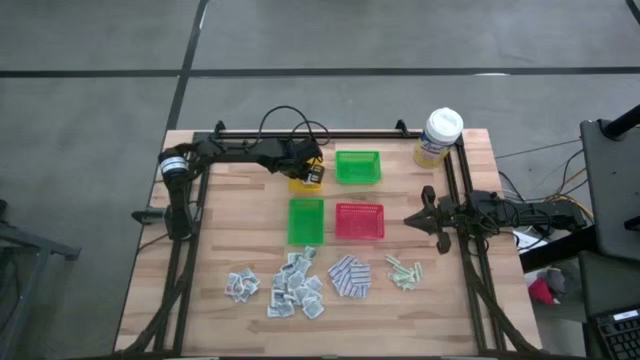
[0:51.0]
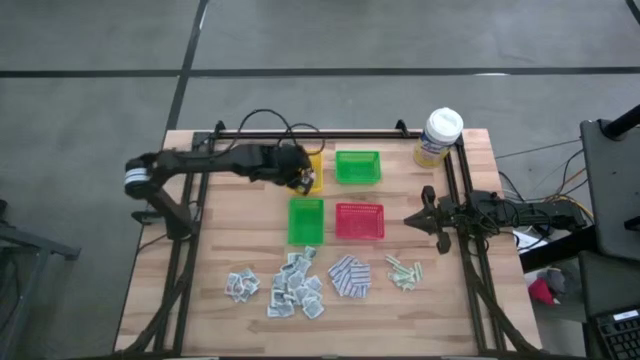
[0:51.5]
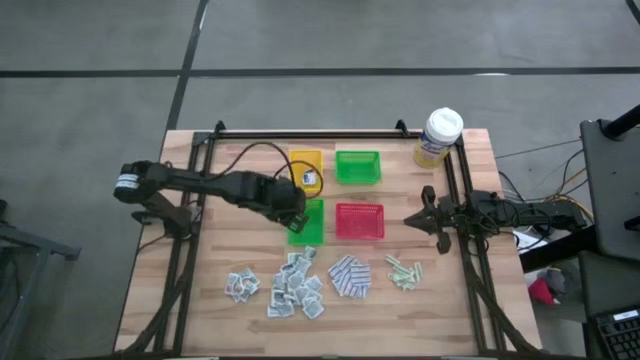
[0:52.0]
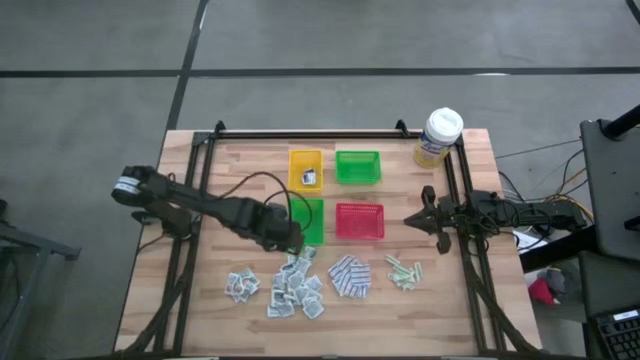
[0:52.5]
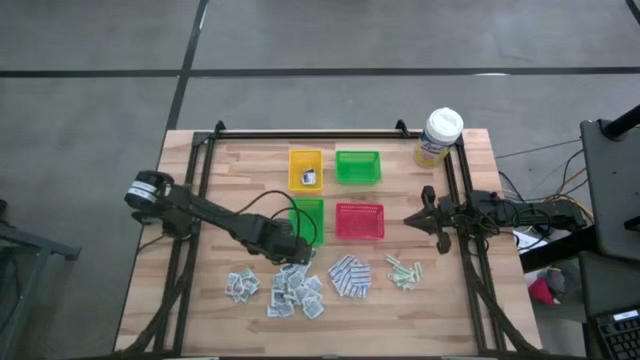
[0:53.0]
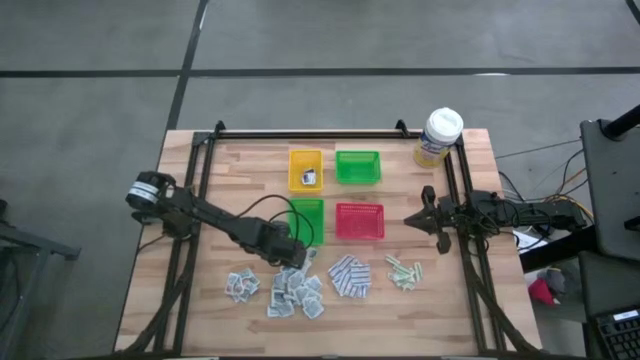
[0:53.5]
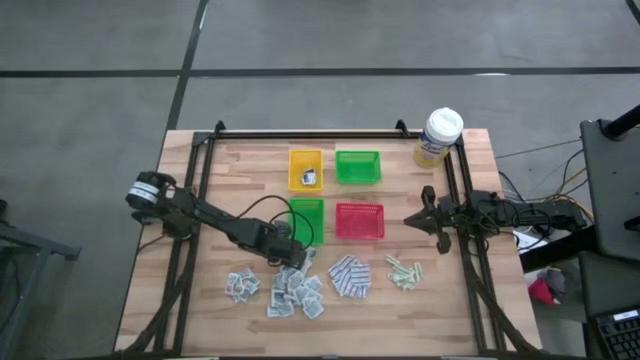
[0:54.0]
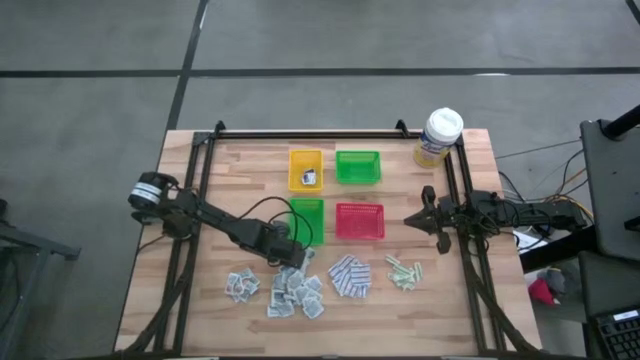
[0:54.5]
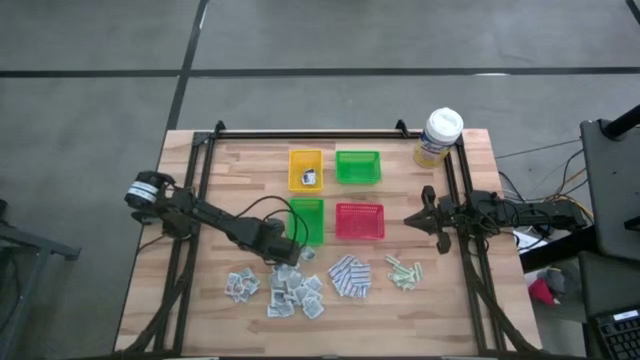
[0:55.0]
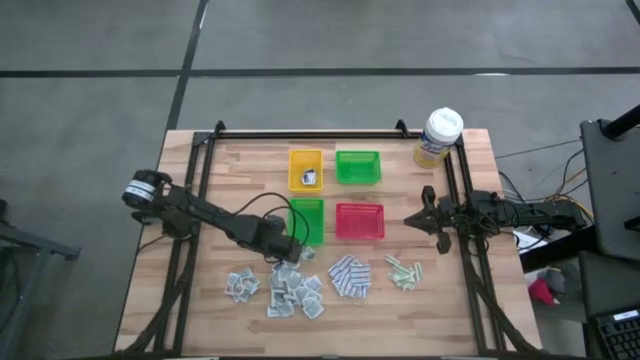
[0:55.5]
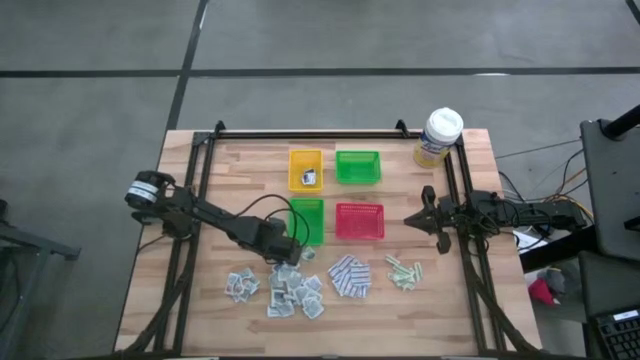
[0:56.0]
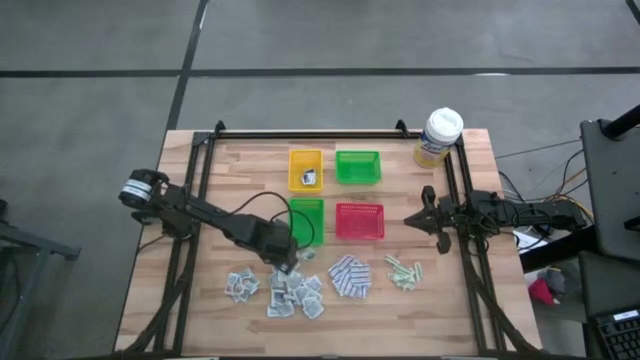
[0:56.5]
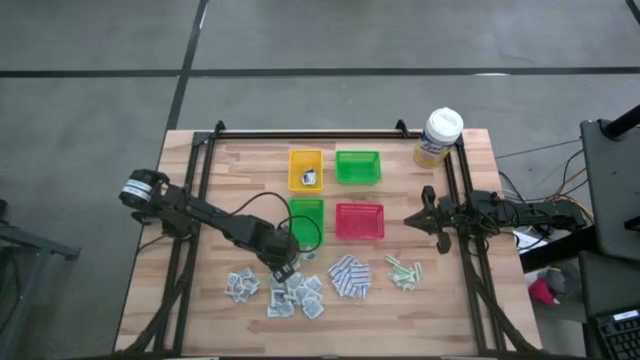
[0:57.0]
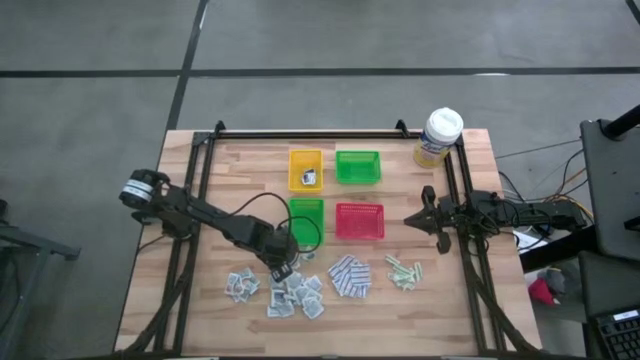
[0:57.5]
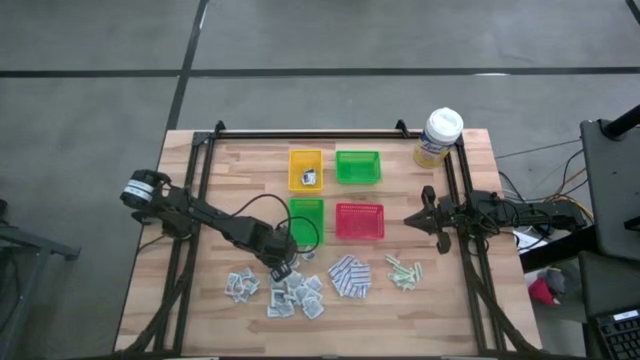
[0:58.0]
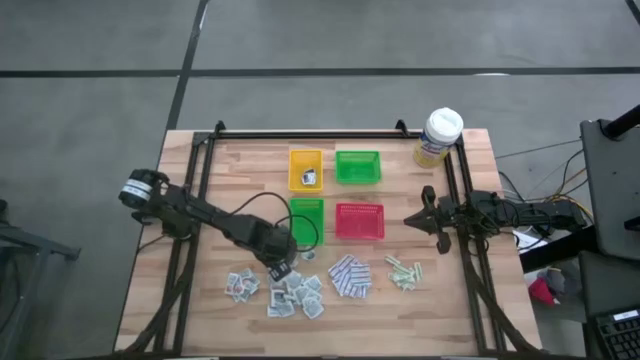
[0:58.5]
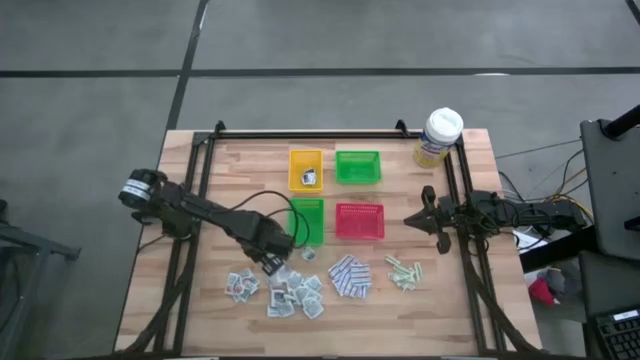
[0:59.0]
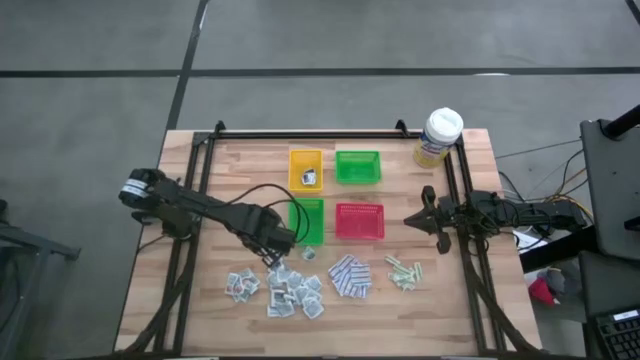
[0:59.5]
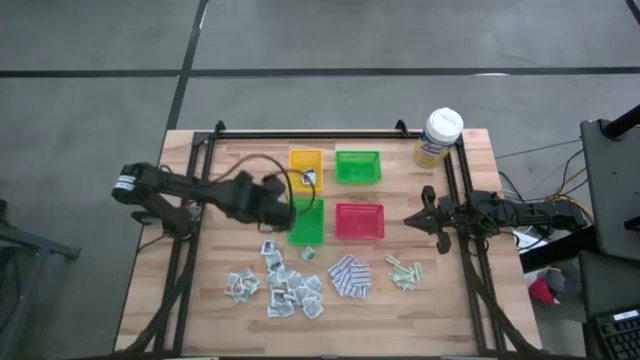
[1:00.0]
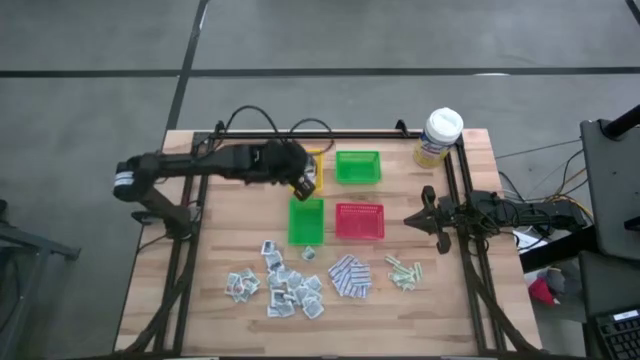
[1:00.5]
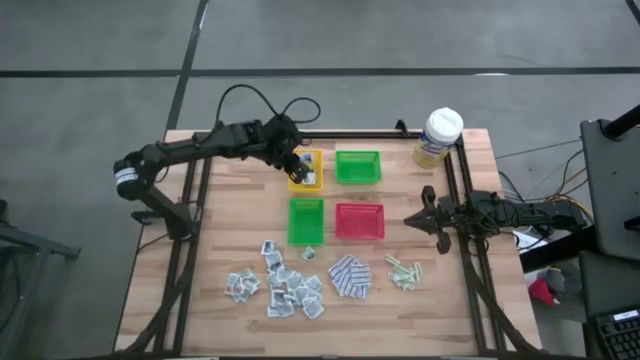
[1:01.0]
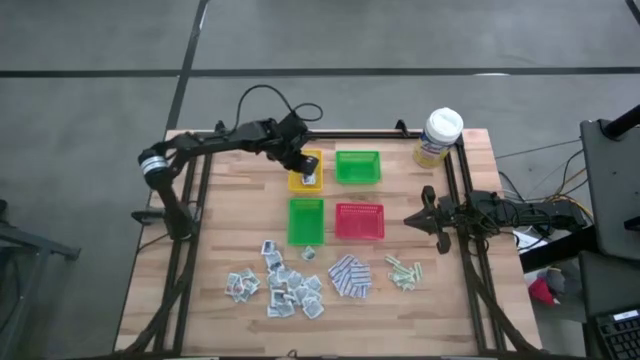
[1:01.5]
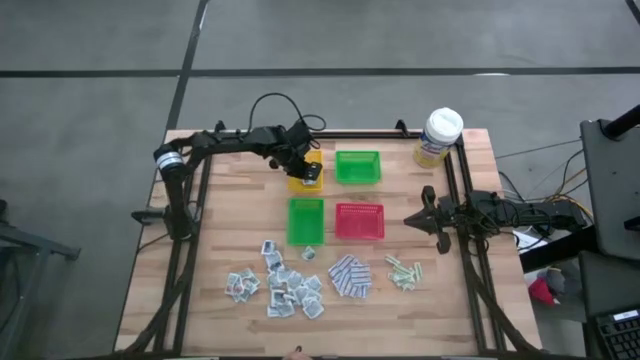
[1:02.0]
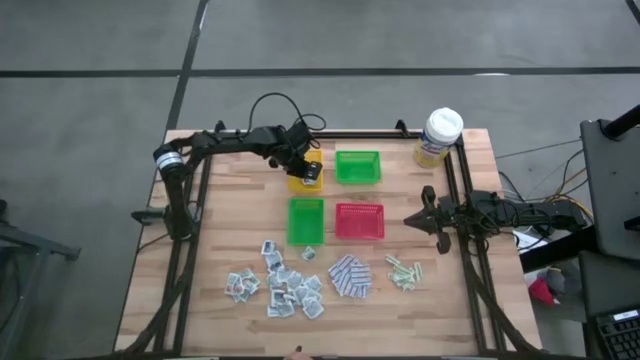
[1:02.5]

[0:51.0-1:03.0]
Task: Pick & Place First Aid Supplies
Put the blue alcohol pad into the yellow bin

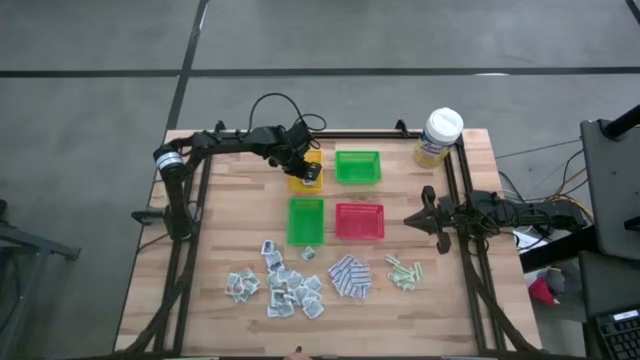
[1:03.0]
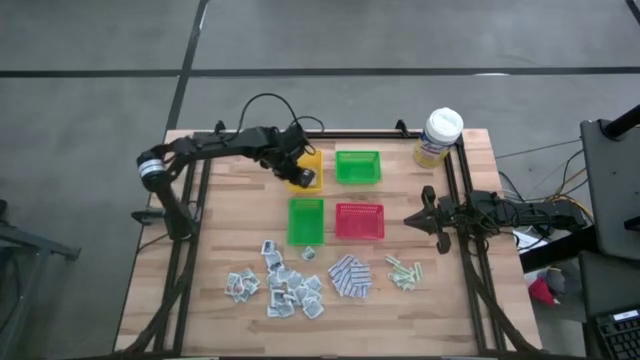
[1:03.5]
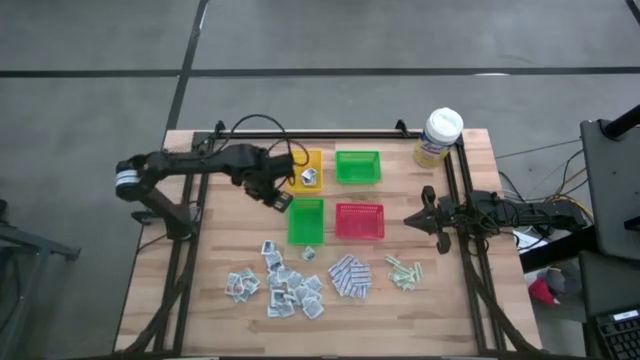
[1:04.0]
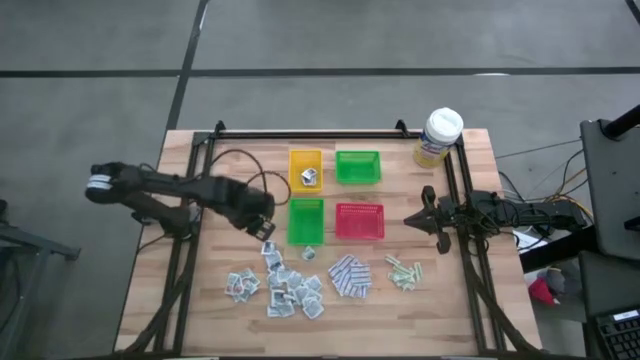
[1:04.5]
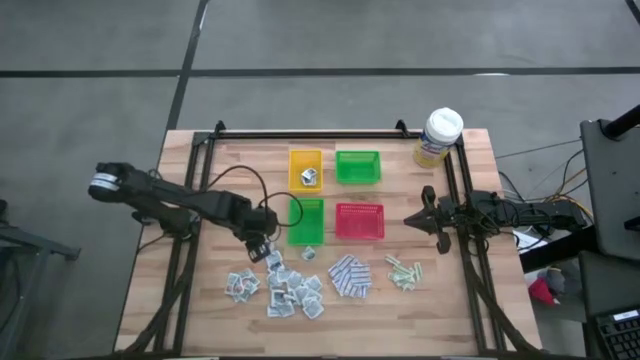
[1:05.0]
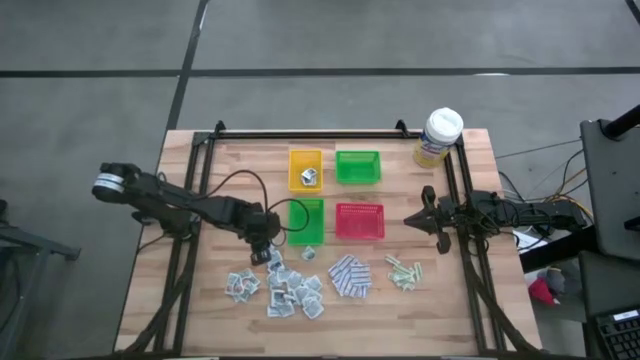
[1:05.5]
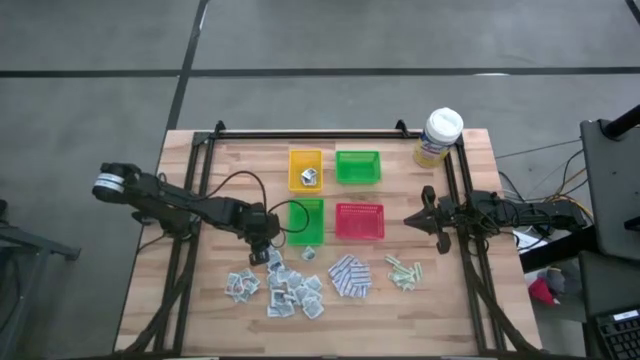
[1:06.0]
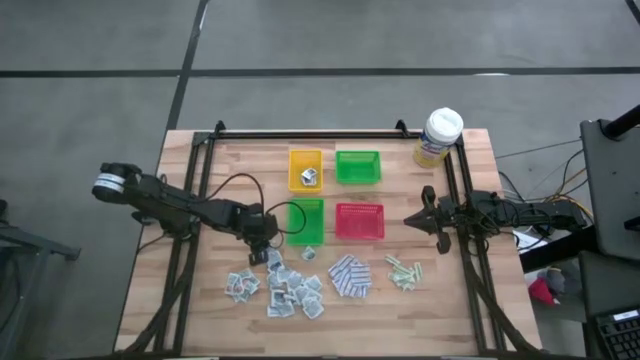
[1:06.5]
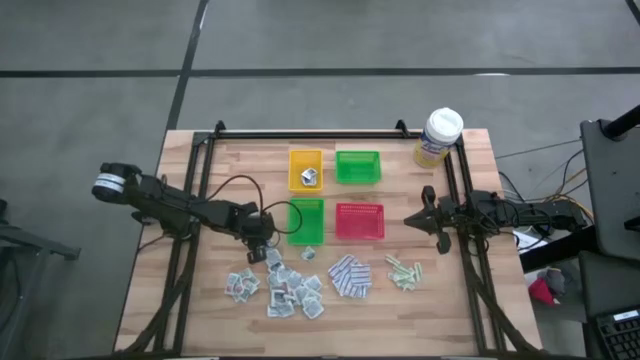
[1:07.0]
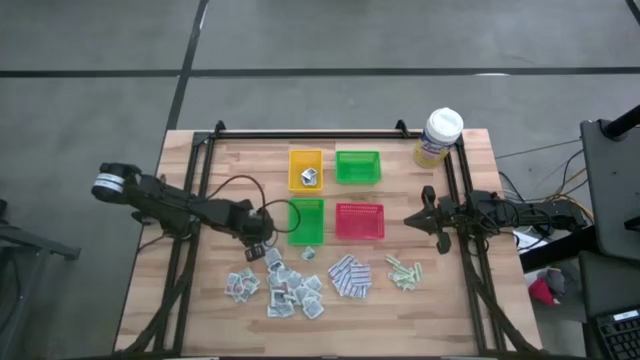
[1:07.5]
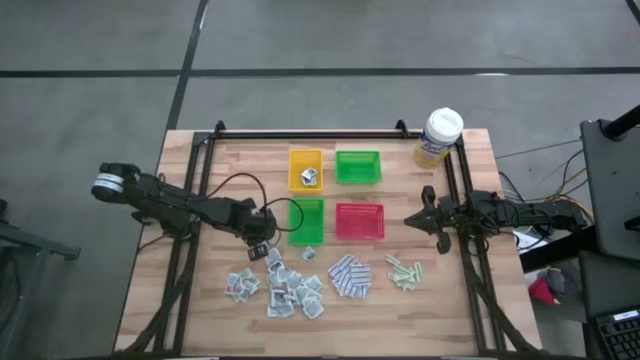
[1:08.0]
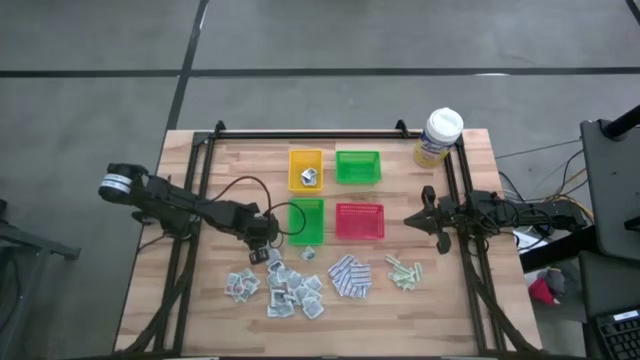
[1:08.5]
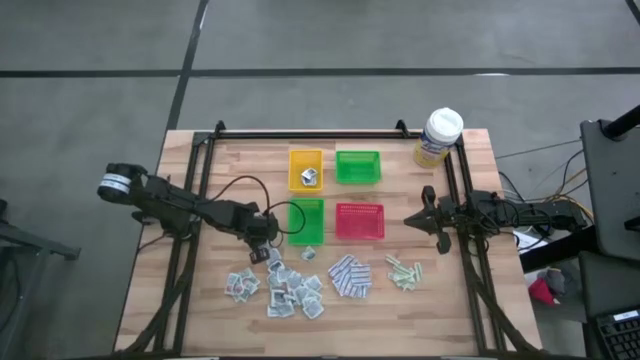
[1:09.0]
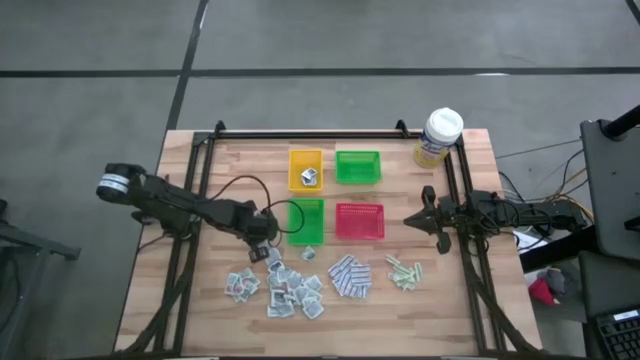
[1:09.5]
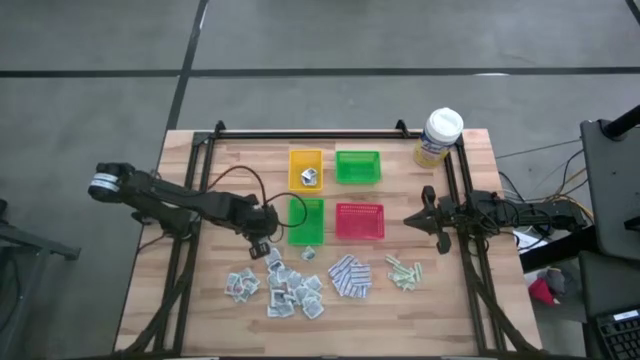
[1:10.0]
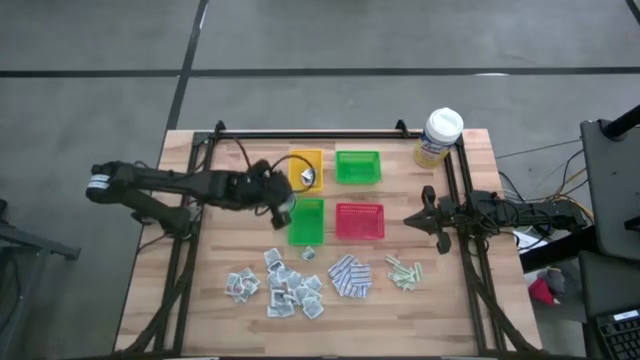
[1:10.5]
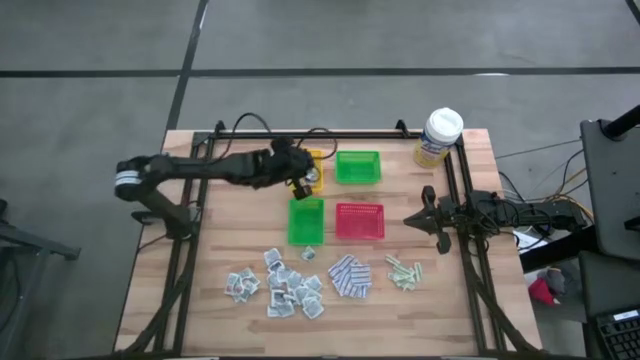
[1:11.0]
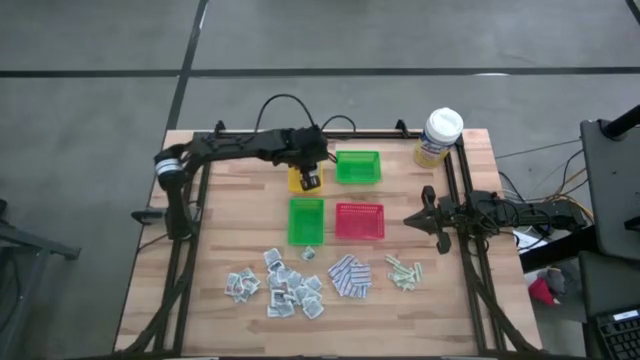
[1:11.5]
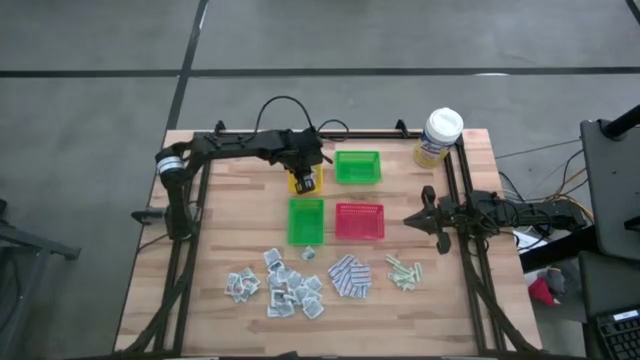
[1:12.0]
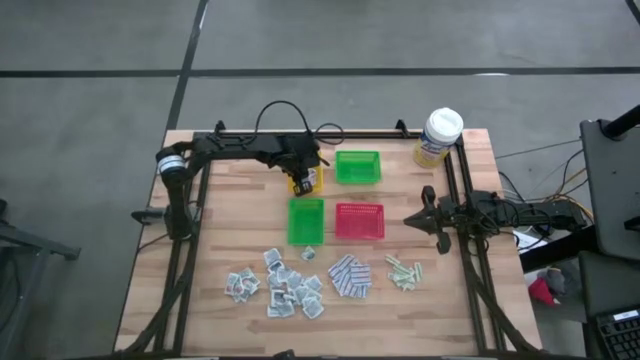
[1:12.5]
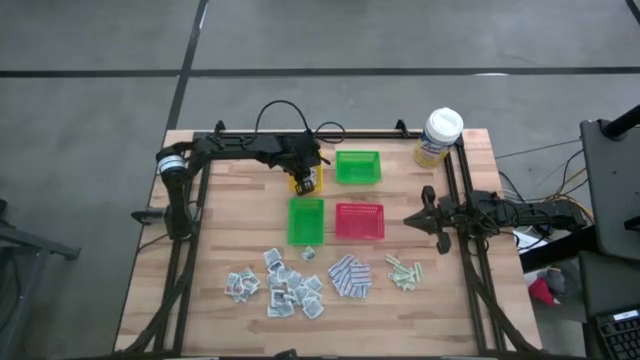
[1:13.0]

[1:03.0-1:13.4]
Put the blue alcohol pad into the yellow bin
